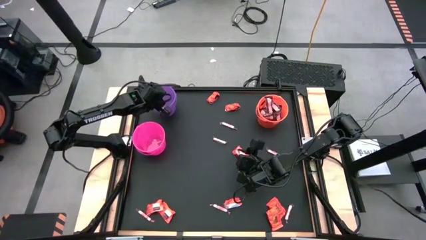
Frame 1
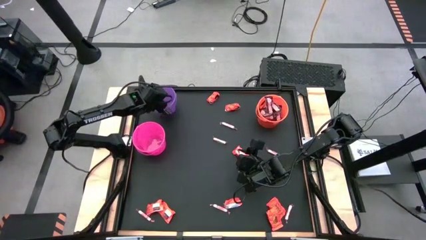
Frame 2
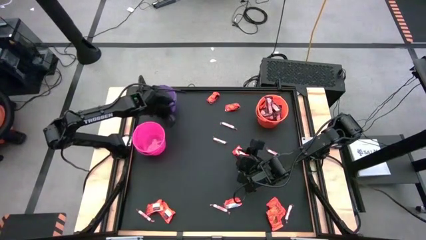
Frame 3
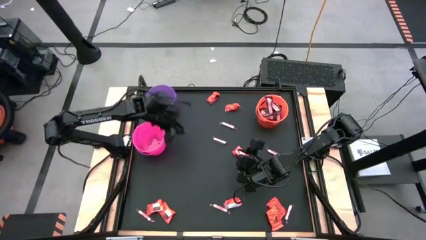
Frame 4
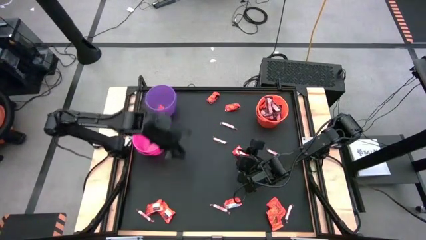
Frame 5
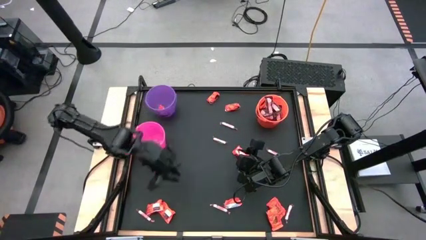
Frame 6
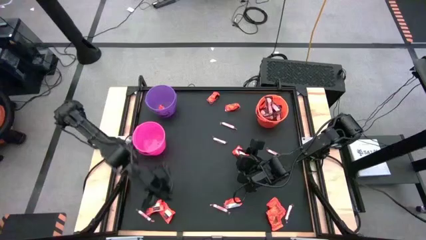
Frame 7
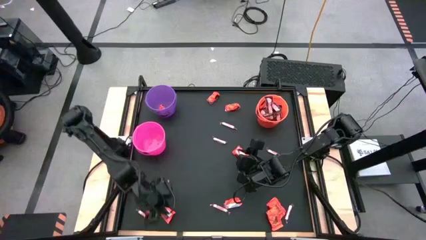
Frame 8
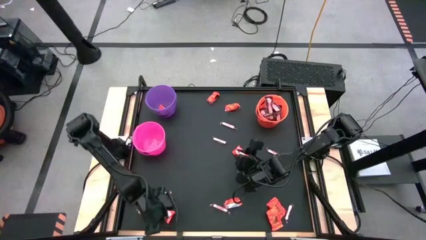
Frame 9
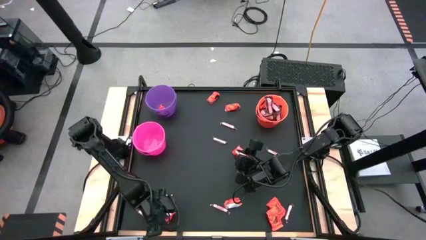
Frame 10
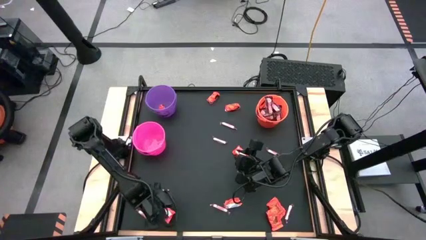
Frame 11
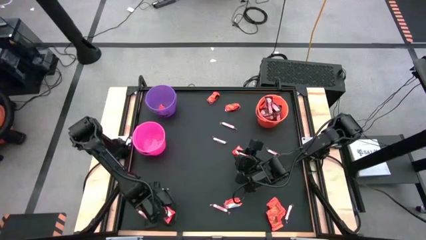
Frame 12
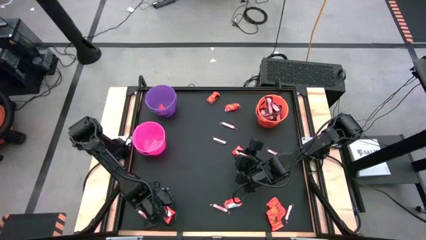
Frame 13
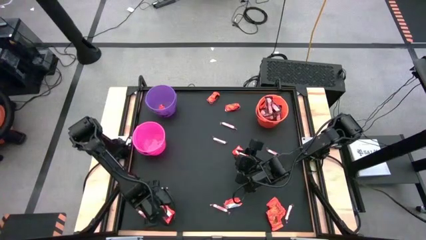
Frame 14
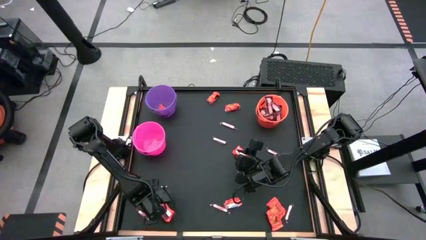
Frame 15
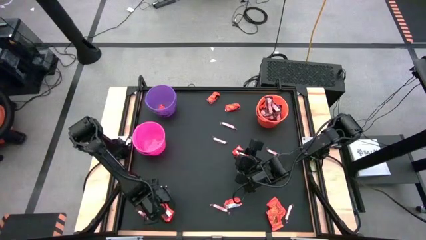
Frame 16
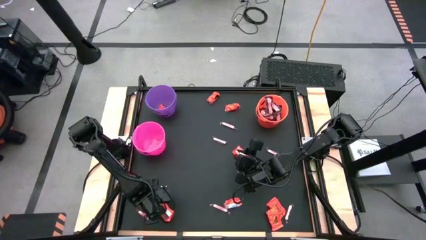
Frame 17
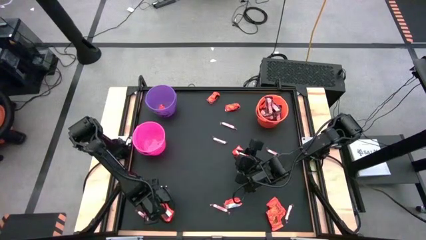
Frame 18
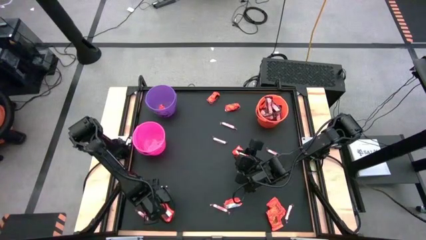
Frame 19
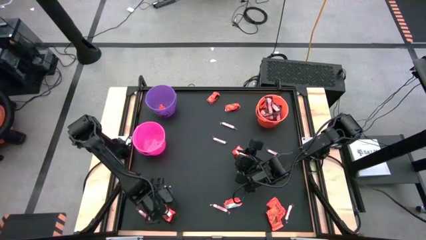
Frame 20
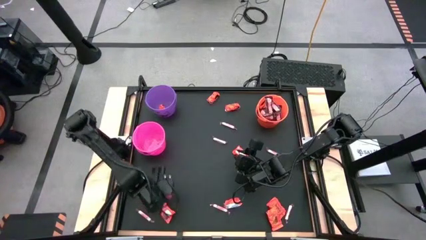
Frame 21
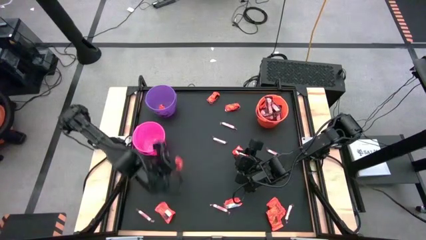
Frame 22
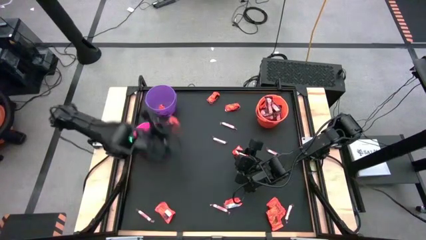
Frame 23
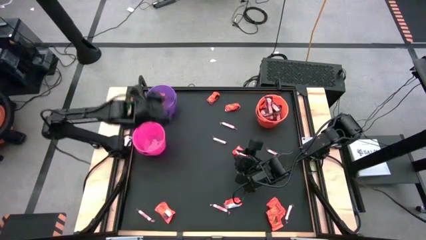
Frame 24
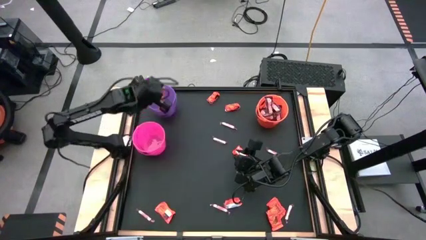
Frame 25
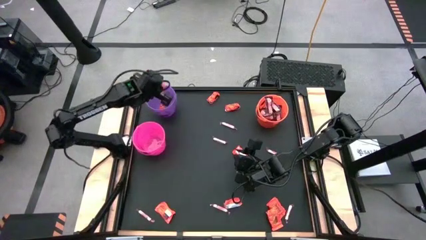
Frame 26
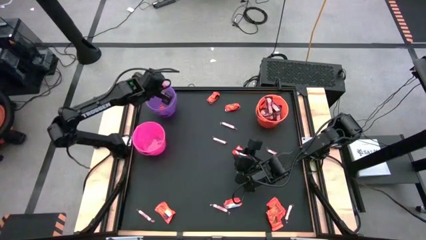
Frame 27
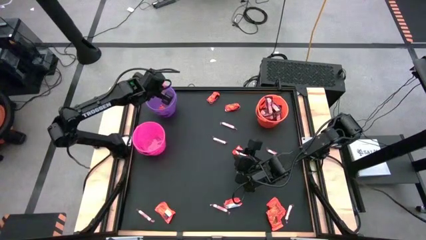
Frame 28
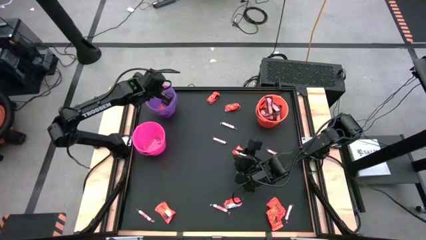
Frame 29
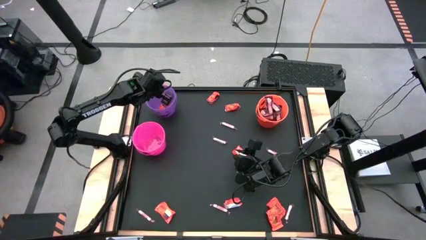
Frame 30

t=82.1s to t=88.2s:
Task: Sort candy by brand, put in halloween buckets
Put the orange candy into the purple bucket

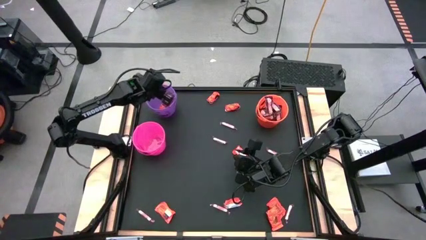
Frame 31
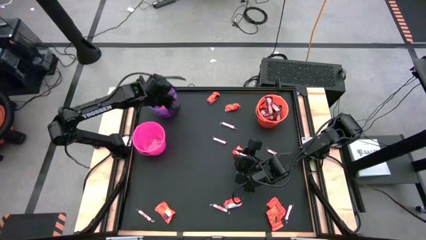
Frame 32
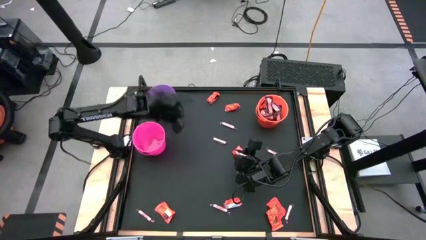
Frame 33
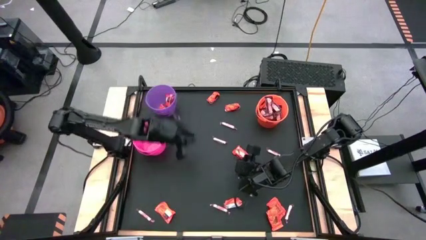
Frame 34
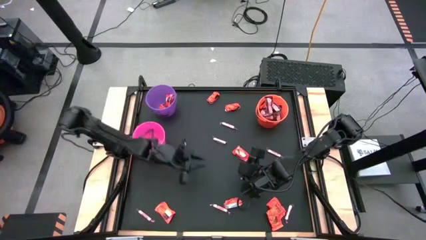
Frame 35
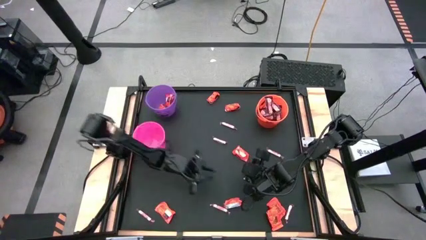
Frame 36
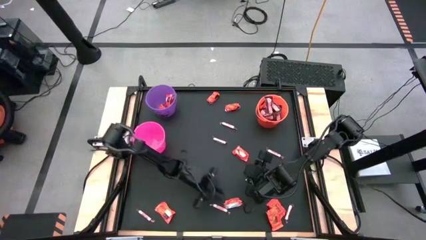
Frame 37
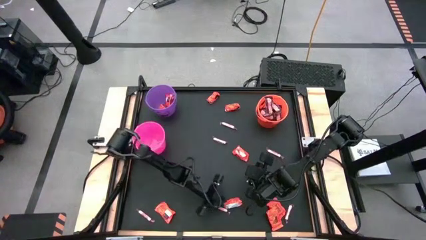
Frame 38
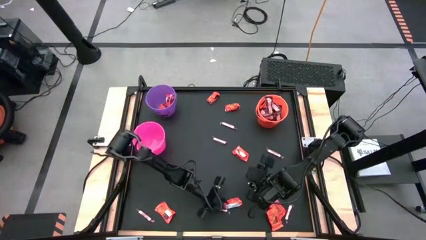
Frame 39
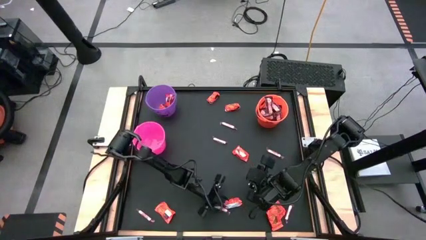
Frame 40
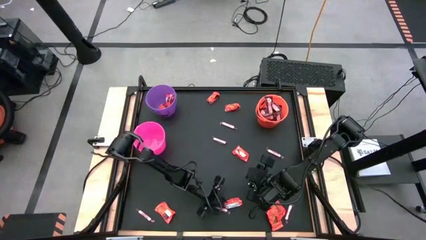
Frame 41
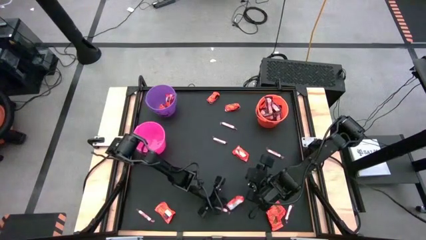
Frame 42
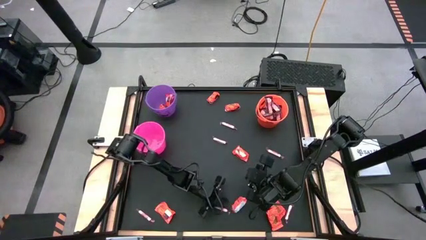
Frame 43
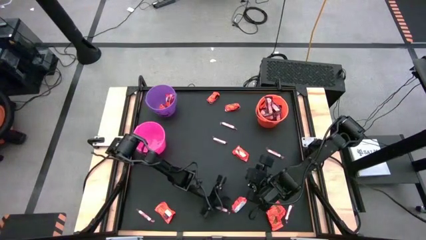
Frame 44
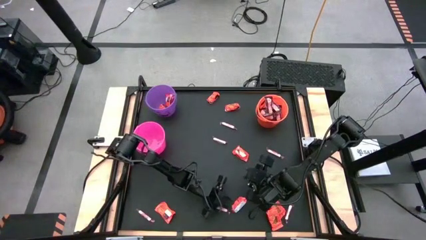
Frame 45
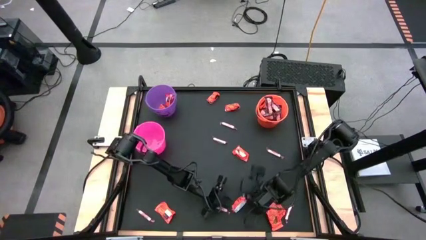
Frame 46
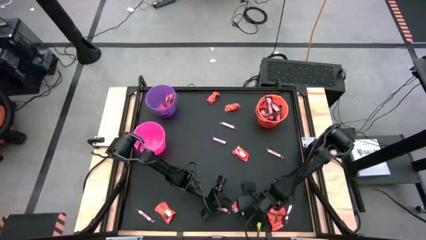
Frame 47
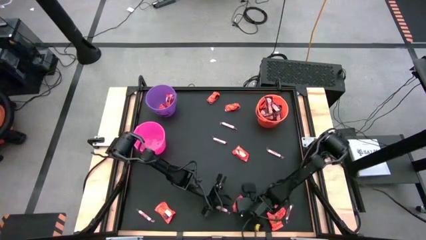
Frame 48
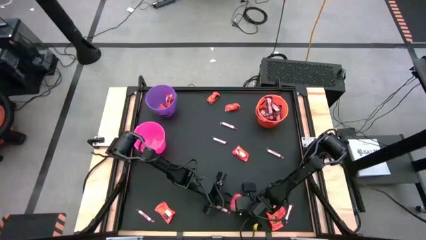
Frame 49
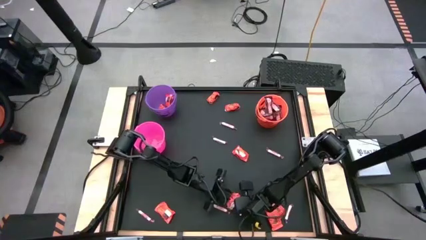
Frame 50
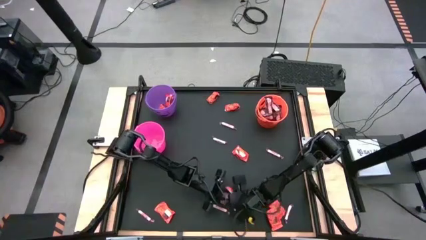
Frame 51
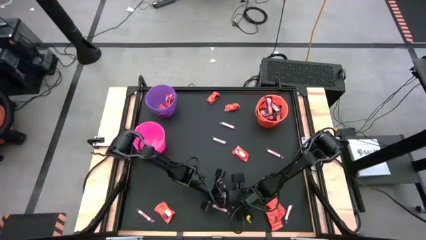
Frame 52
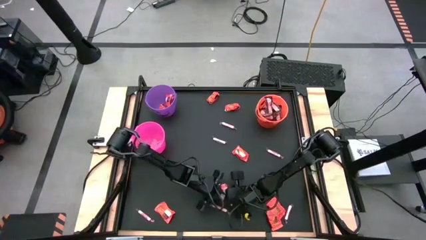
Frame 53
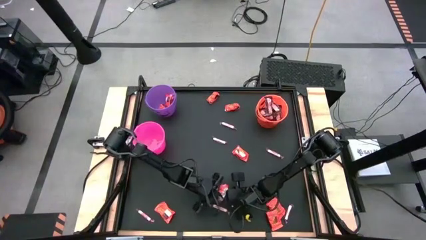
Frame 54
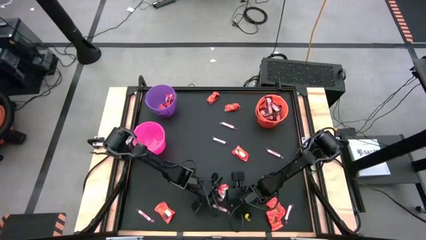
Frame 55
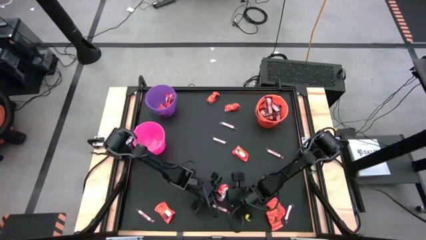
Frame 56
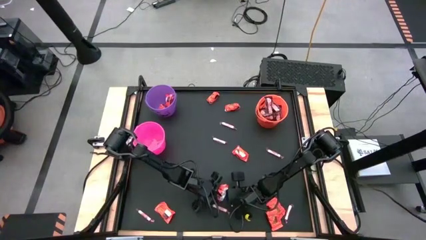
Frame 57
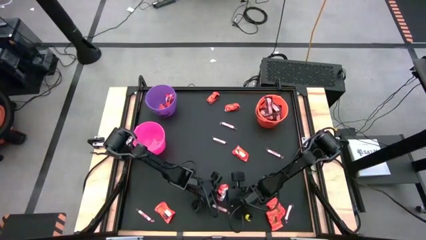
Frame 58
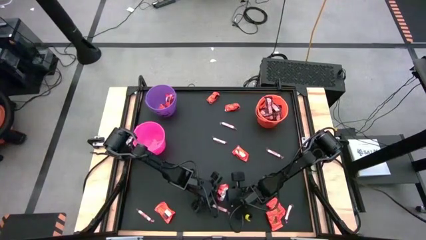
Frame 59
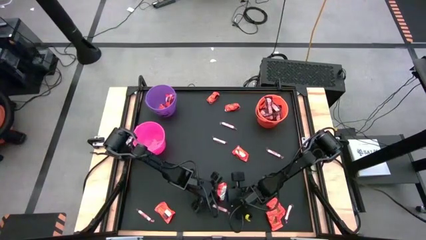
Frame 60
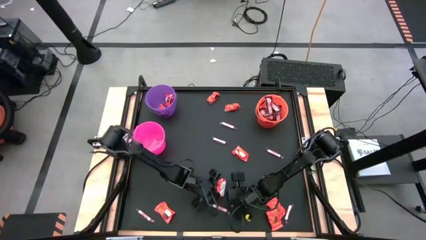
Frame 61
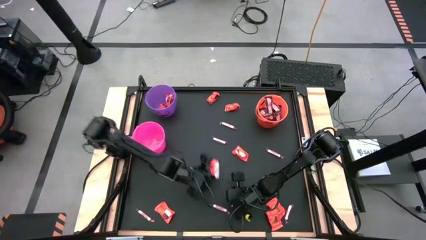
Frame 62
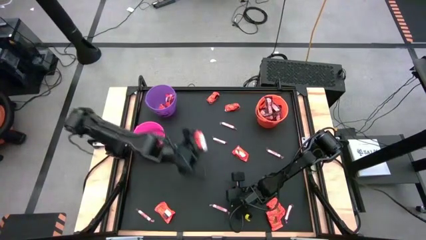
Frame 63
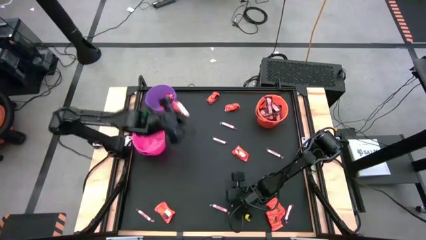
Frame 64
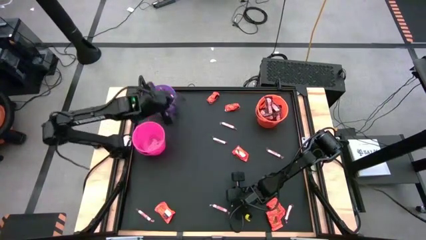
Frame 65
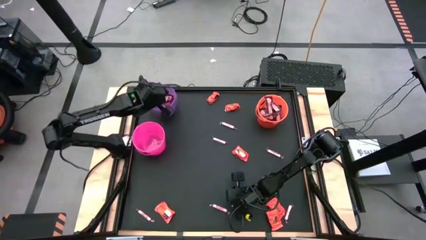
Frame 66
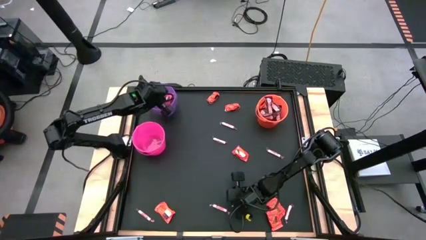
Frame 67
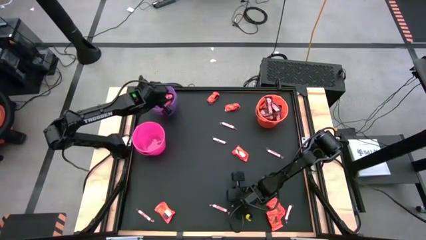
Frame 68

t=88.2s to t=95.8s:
Put the orange candy into the purple bucket

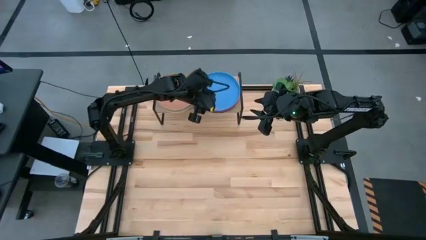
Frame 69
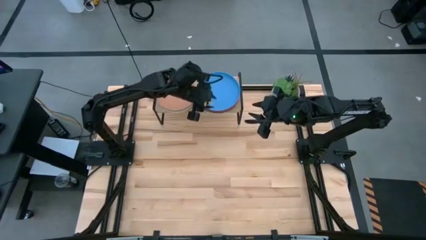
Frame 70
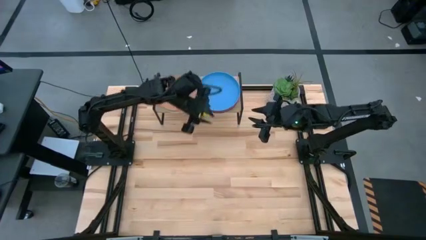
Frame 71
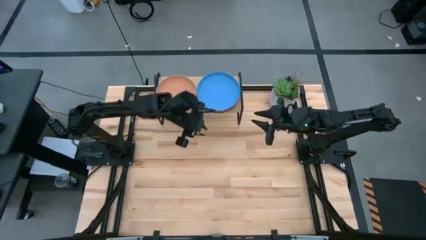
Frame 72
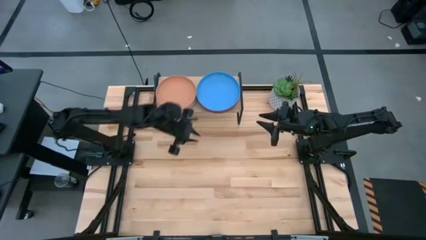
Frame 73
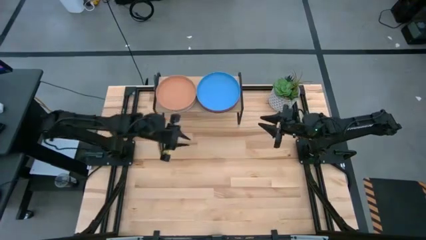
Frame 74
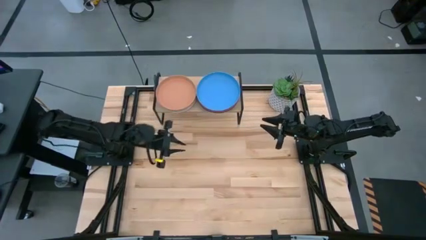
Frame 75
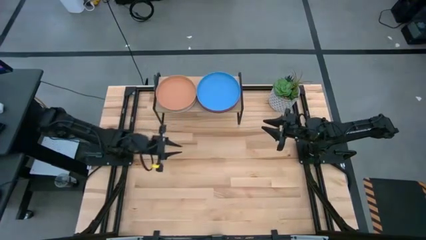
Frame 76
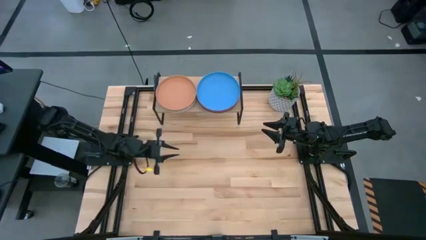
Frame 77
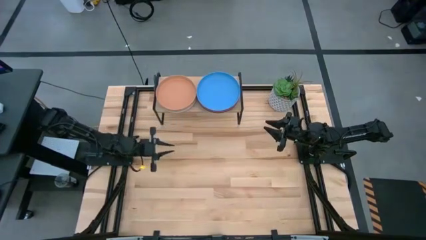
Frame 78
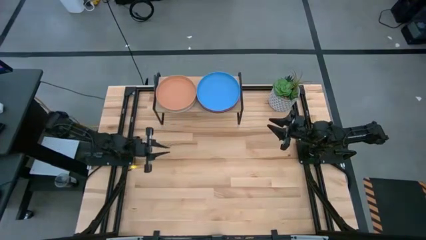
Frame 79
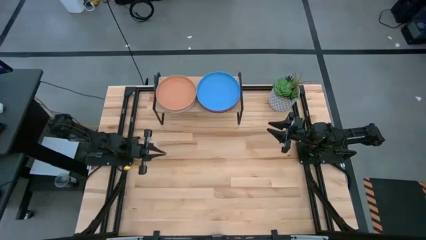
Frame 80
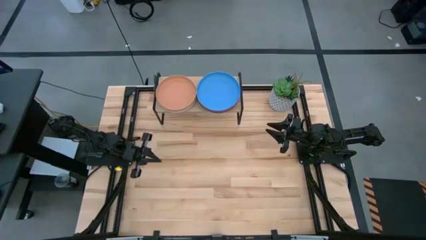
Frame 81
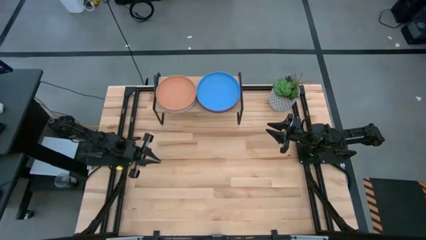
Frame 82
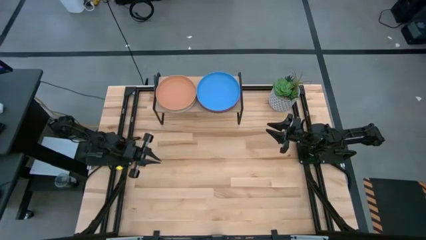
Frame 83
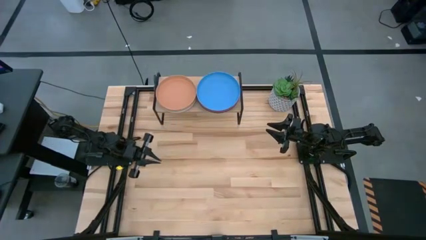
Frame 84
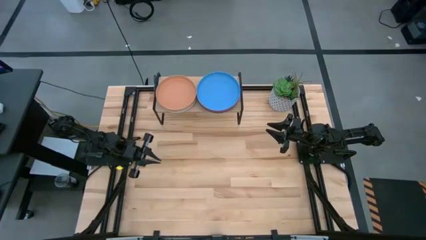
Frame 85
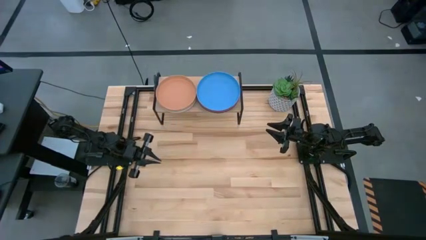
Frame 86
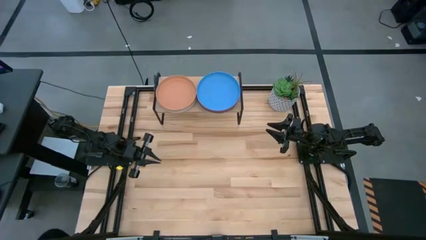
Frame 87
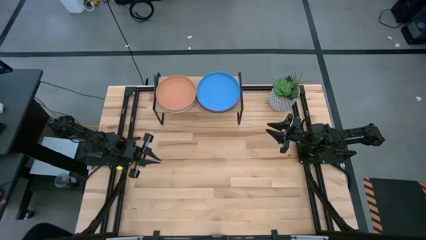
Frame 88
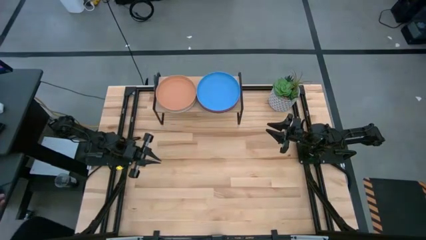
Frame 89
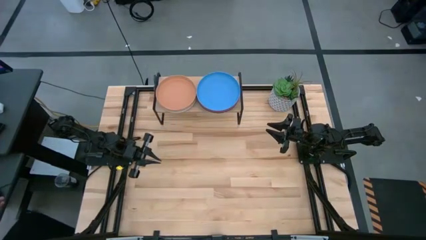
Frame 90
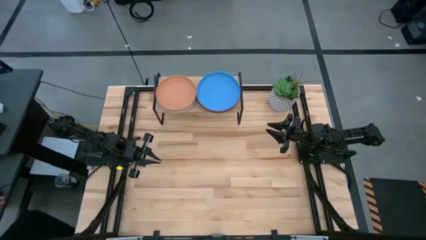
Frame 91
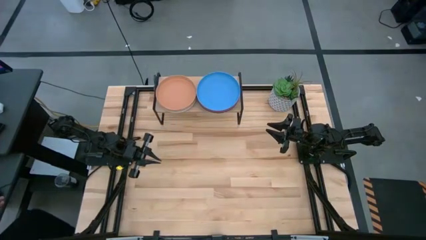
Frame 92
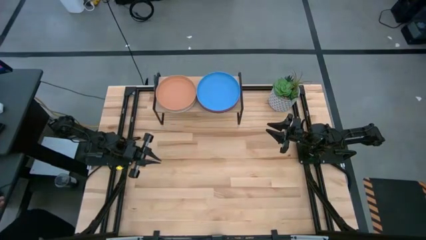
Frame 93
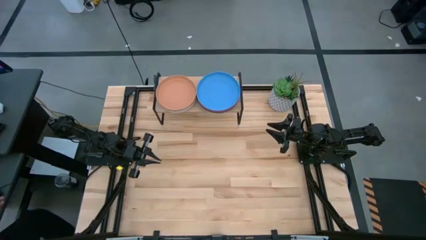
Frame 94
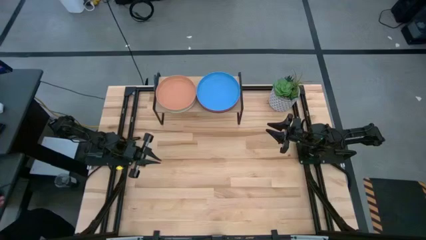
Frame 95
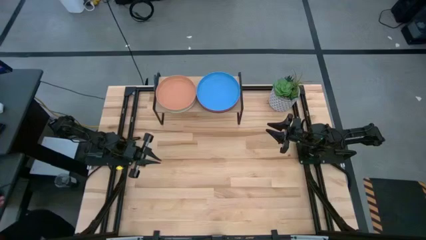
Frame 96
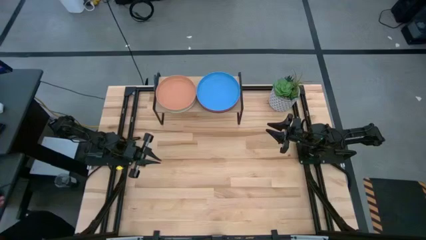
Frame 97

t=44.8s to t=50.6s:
Task: Place and stack plates onto a shelf
Return to Home Position
